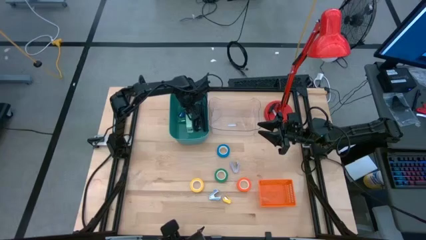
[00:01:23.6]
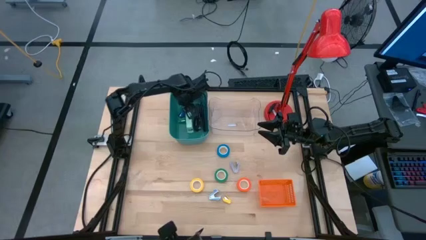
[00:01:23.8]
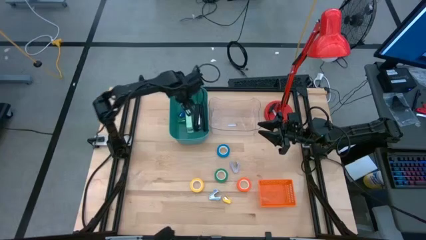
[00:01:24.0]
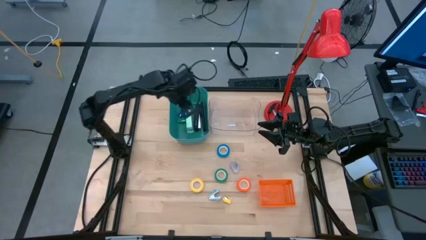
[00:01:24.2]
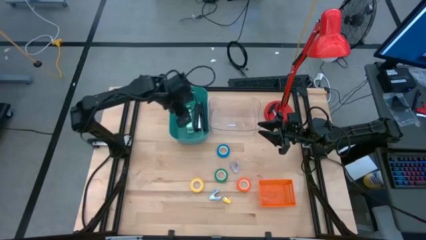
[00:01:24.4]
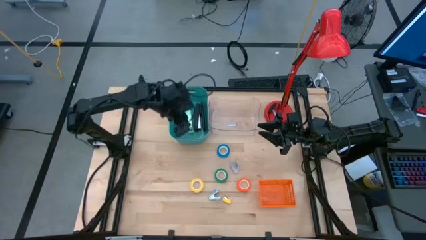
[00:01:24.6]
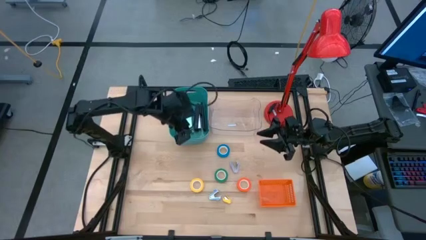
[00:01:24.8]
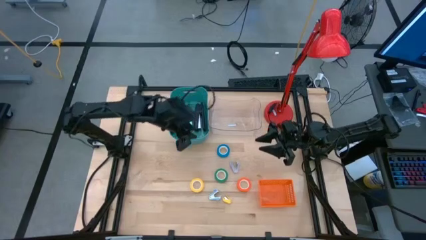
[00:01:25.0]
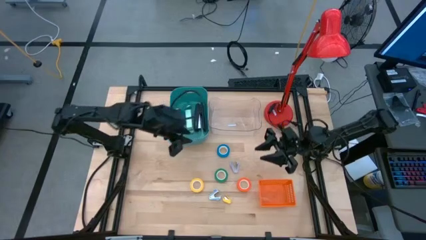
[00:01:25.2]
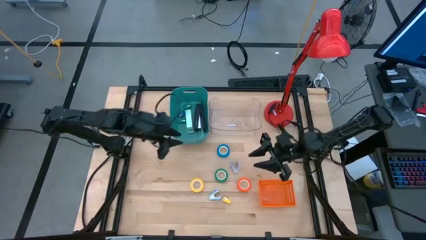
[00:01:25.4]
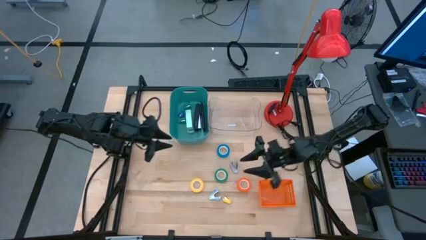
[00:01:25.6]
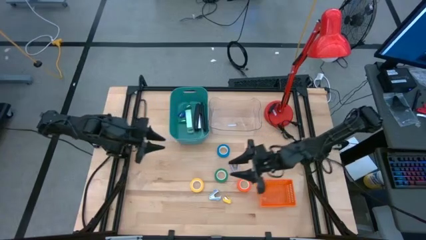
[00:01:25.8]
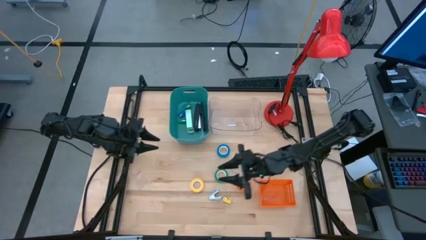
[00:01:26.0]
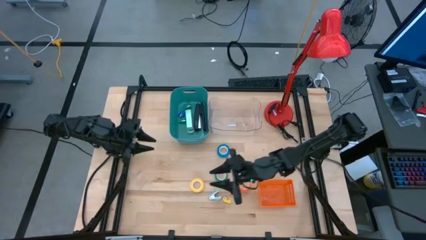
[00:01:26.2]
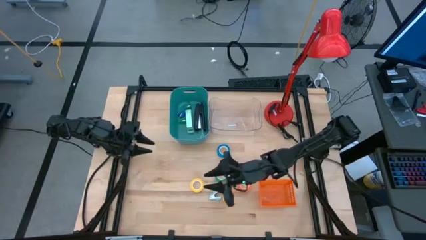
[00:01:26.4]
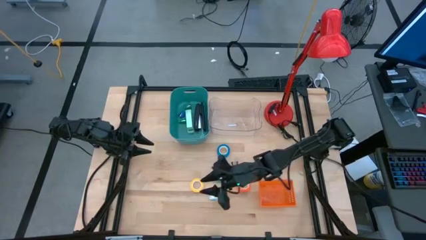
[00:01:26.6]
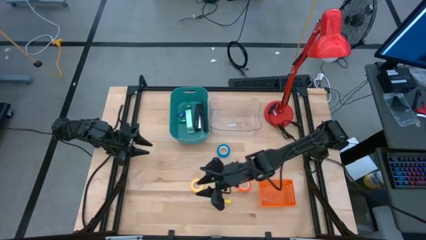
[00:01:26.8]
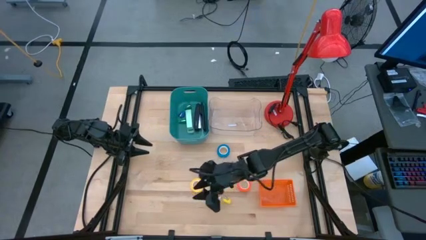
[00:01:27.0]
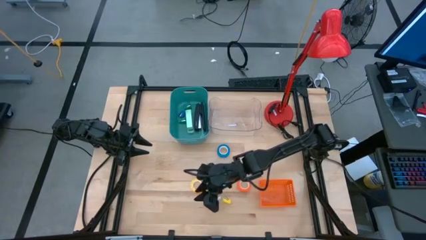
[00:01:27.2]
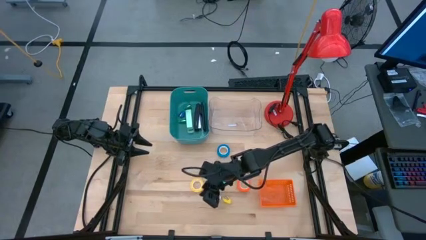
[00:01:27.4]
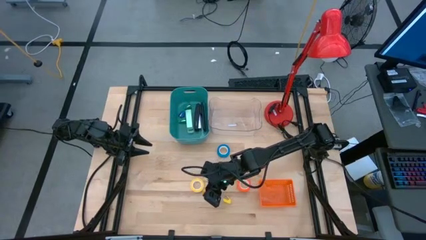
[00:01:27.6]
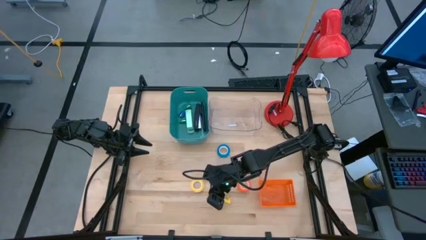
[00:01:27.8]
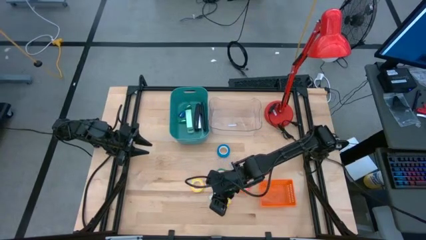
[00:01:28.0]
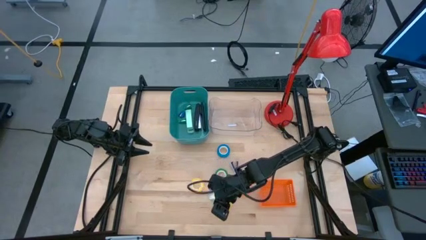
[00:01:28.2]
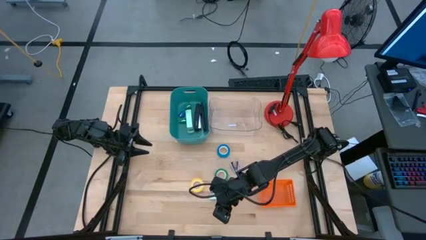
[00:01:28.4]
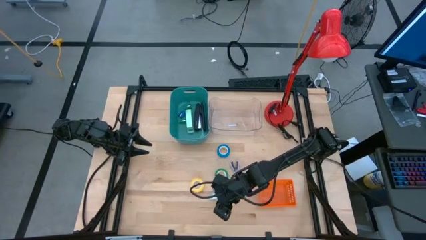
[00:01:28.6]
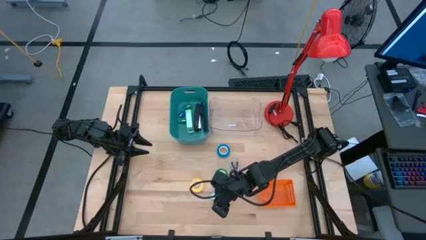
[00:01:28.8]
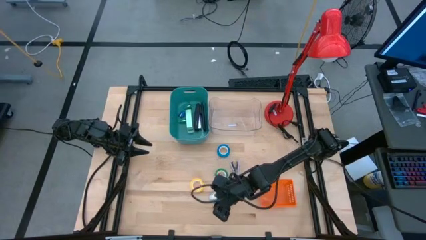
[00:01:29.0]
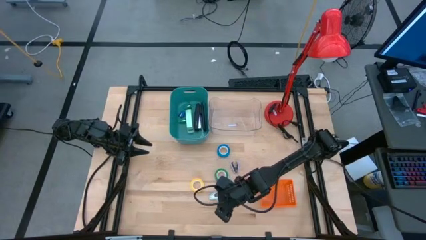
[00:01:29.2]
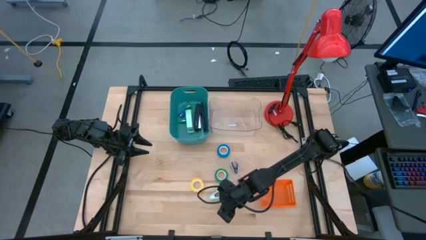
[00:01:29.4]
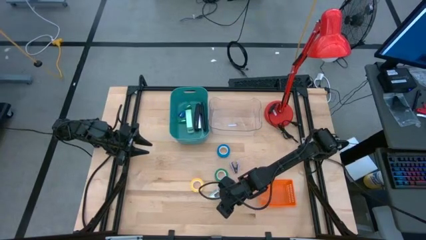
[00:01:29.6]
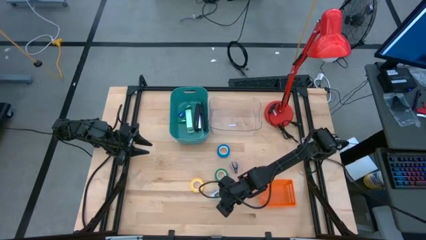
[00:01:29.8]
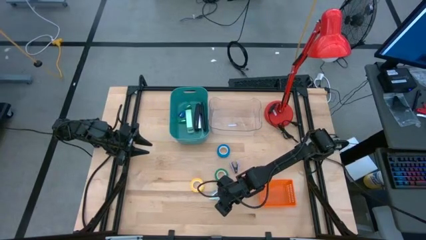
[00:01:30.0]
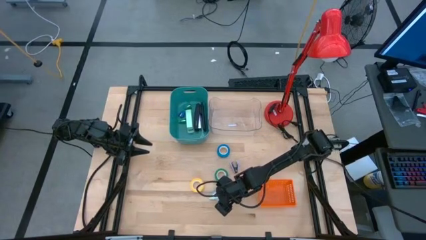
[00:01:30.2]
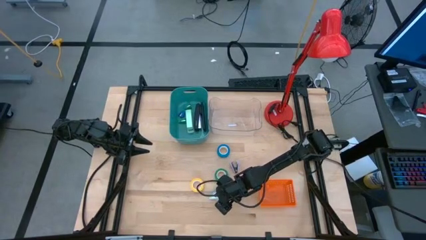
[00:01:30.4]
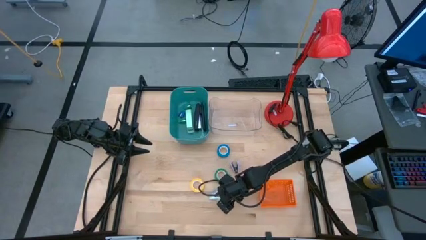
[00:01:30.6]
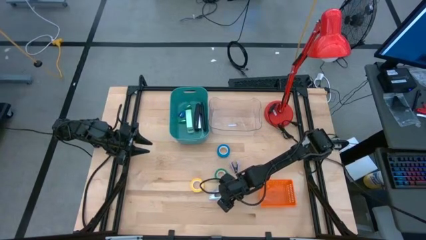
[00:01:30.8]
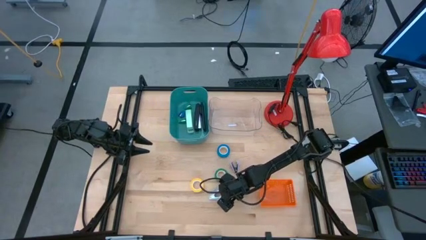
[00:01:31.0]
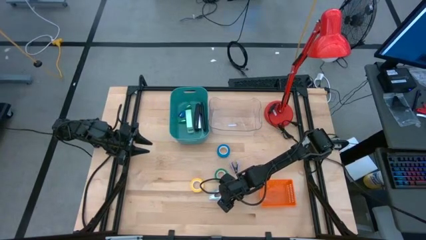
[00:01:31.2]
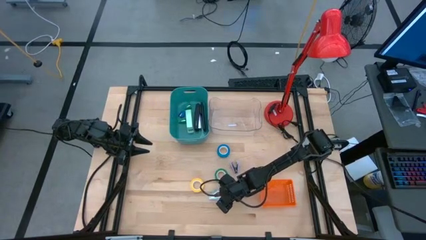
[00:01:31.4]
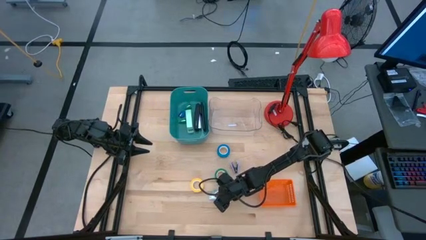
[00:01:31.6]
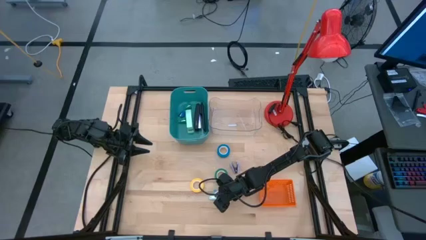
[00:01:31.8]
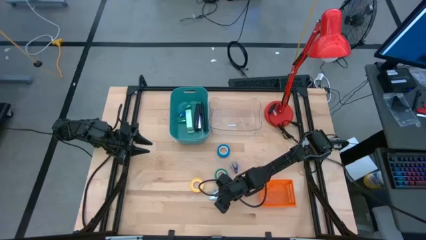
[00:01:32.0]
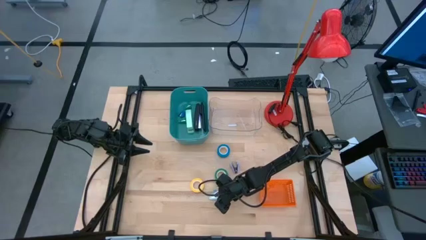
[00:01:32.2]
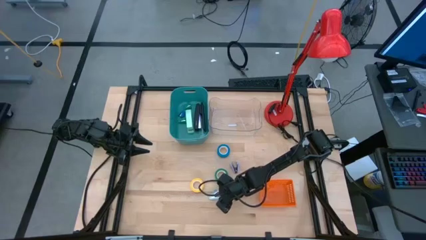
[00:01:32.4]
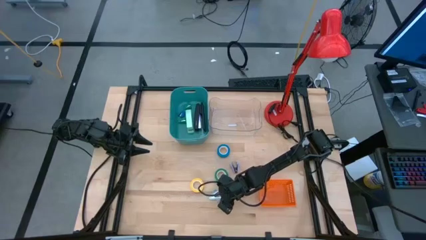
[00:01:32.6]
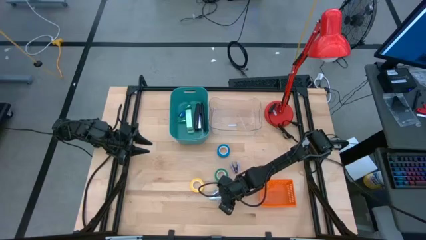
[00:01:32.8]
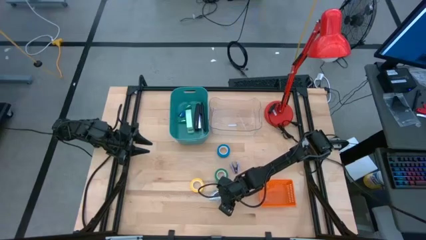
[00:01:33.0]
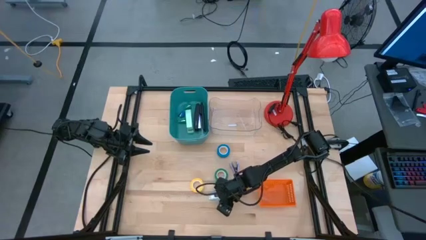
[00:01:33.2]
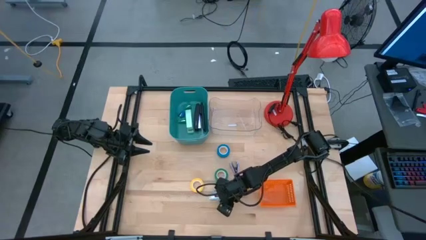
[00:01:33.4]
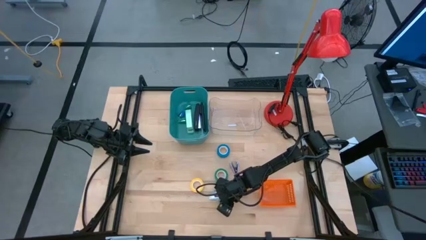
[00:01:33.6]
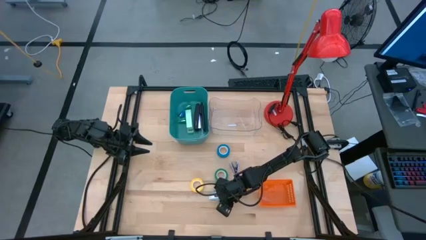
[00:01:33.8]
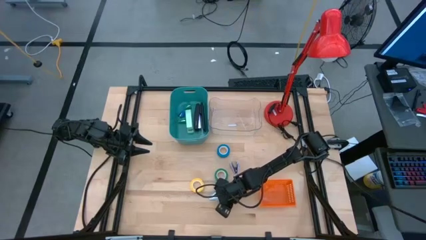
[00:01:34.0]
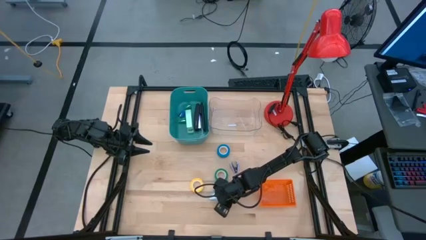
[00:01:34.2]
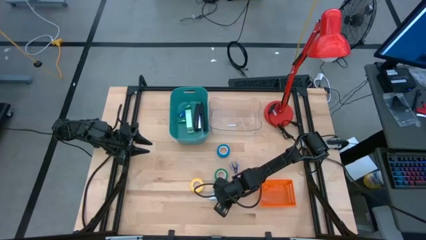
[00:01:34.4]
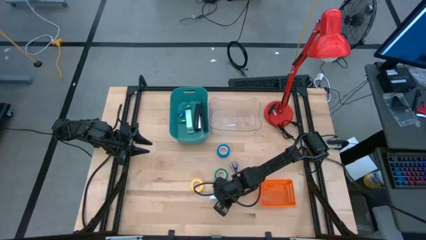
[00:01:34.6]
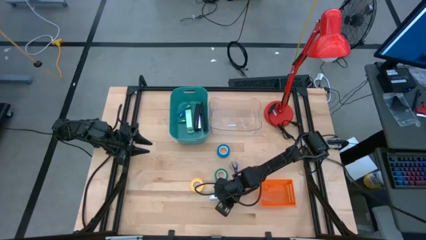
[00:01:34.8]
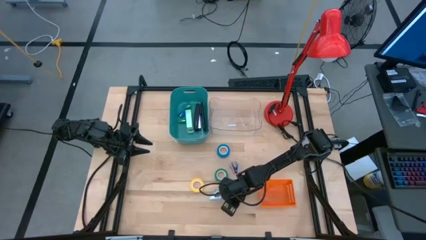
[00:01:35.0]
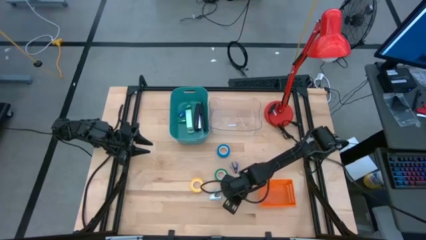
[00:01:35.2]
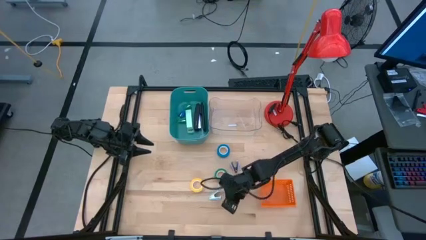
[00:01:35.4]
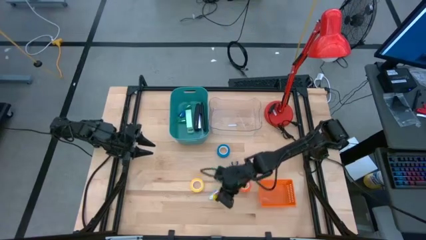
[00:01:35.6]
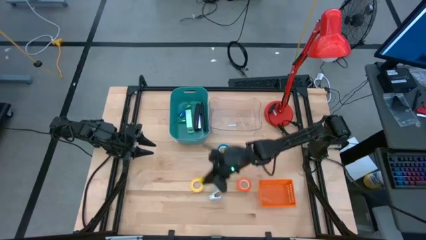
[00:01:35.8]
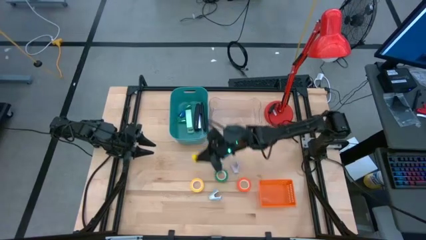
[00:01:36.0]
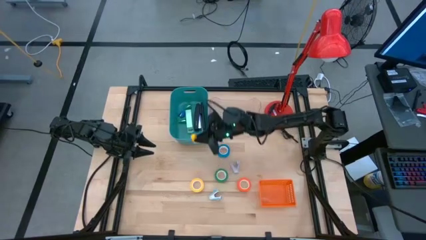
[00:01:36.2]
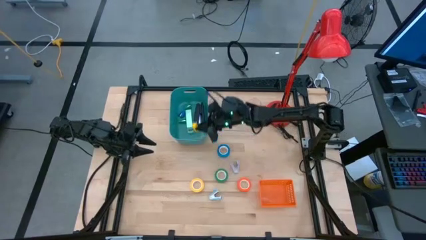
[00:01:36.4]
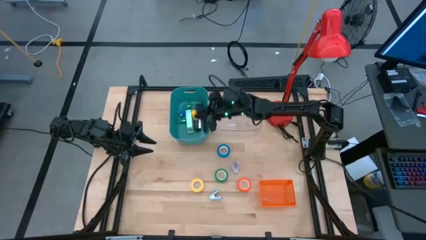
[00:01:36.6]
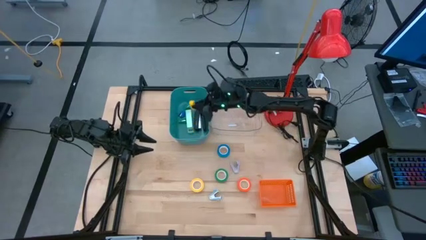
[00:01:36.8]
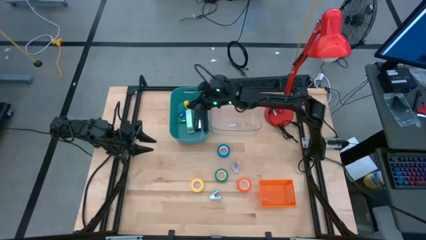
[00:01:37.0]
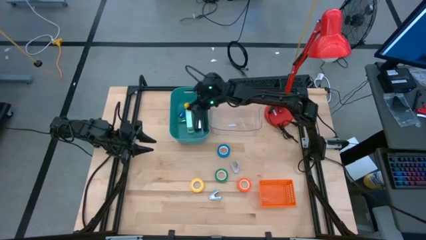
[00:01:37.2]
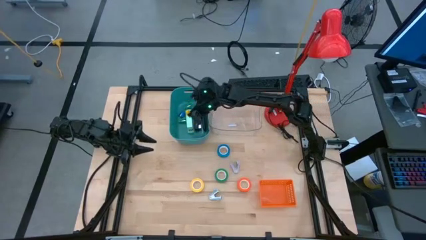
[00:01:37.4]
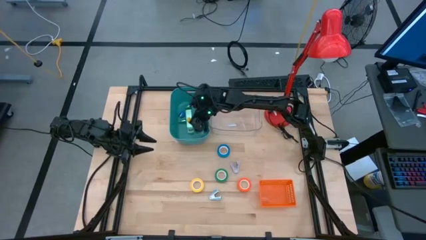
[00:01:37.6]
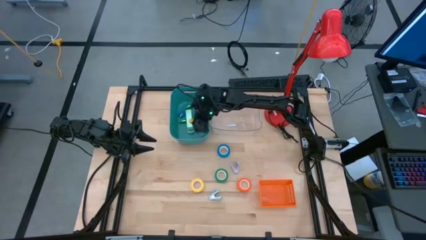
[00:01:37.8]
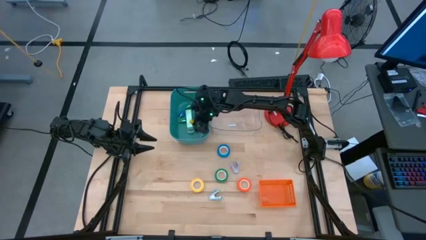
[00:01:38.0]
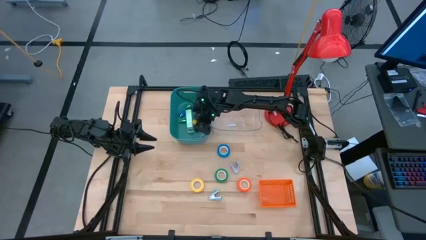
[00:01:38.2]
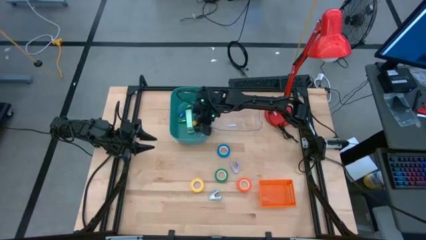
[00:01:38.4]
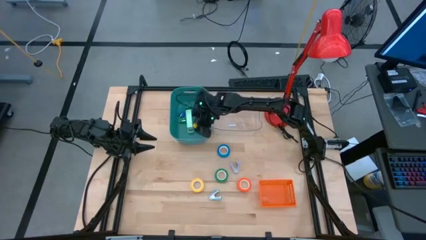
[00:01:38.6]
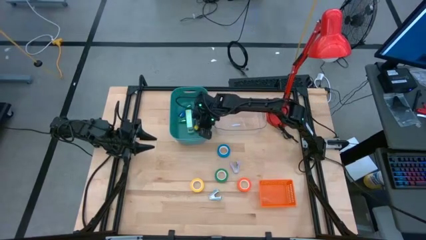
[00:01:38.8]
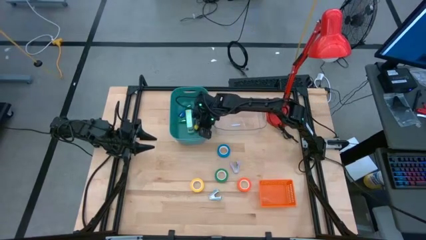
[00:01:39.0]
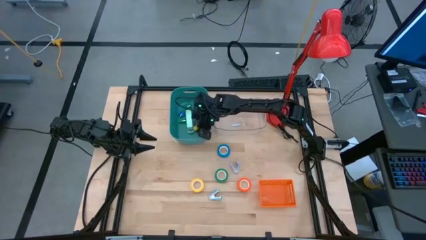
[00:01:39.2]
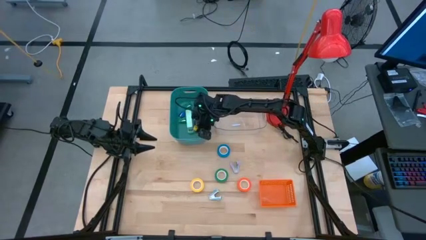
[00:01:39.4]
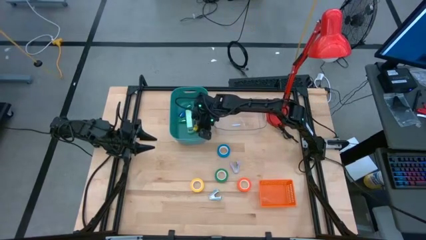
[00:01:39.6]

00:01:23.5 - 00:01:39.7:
Task: Pick and place Stapler, Stapler remover, tape
Put the small yellow stapler into the blue bin
